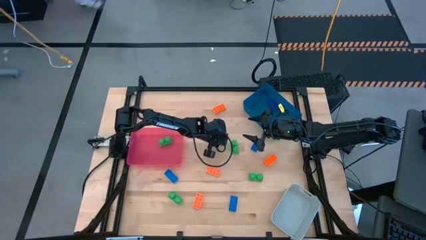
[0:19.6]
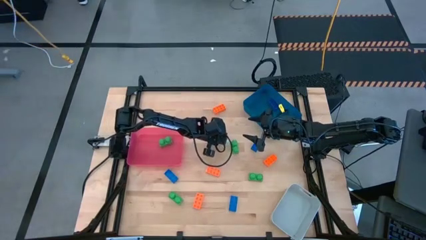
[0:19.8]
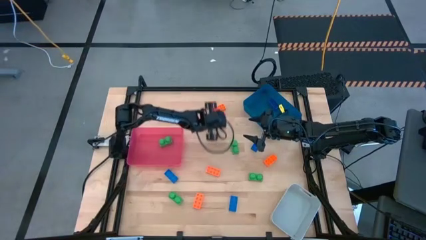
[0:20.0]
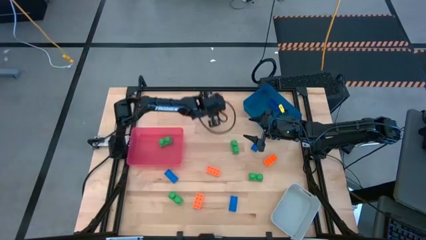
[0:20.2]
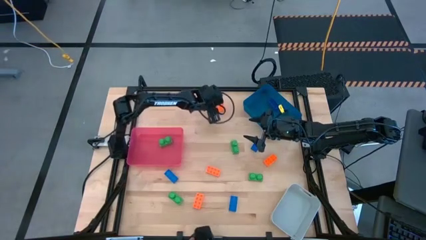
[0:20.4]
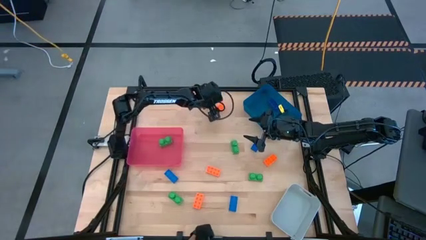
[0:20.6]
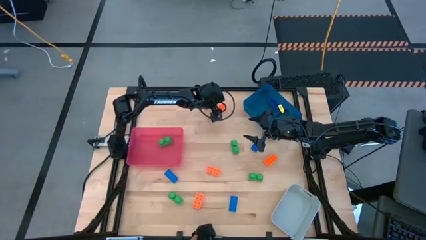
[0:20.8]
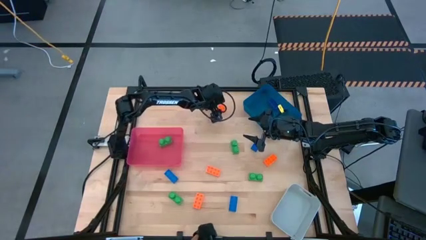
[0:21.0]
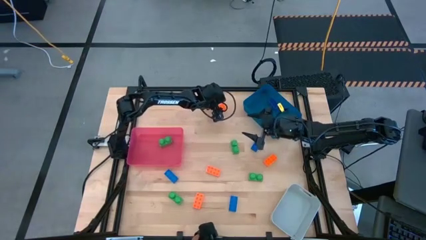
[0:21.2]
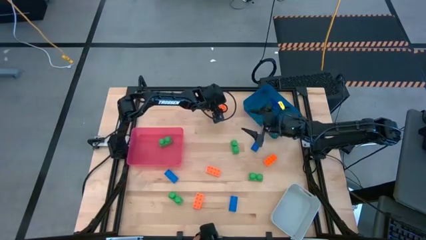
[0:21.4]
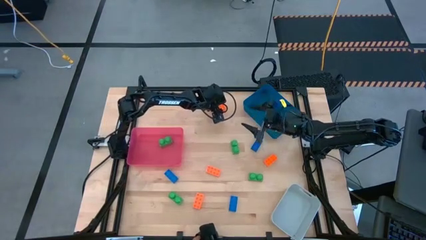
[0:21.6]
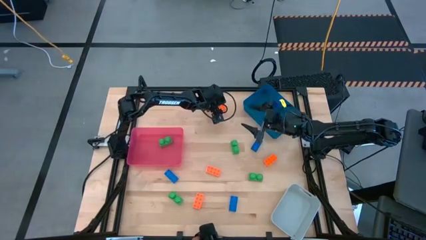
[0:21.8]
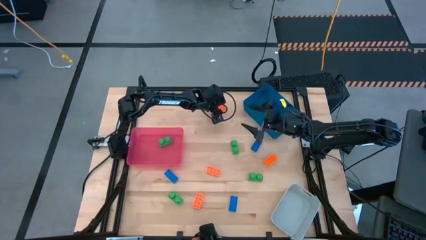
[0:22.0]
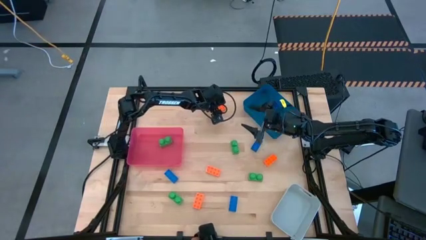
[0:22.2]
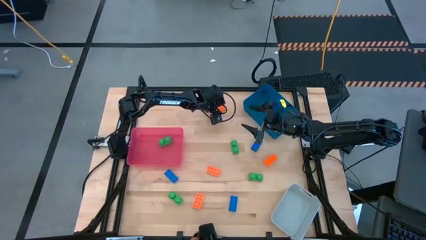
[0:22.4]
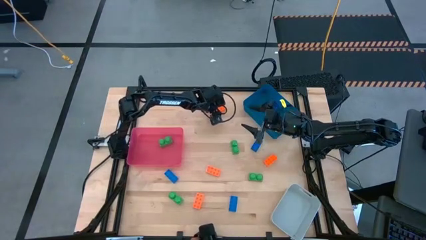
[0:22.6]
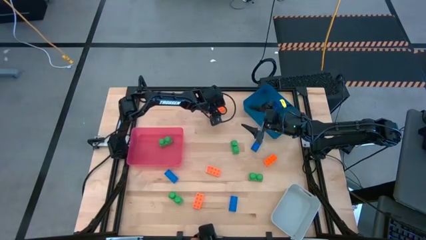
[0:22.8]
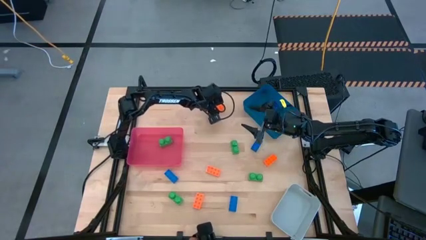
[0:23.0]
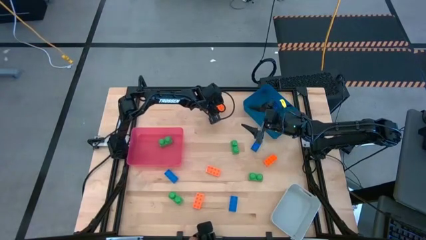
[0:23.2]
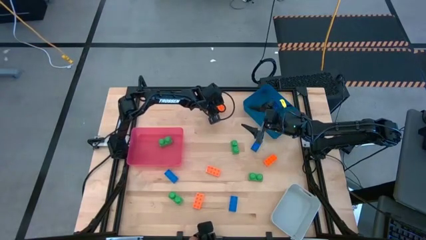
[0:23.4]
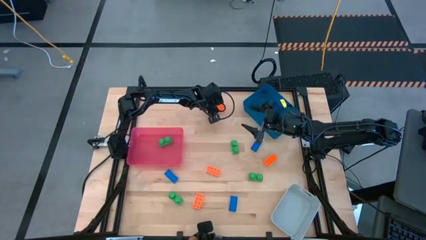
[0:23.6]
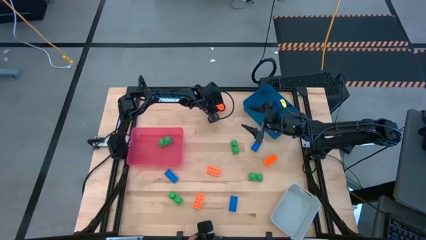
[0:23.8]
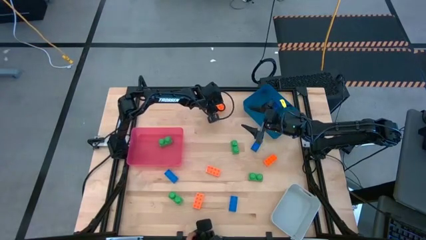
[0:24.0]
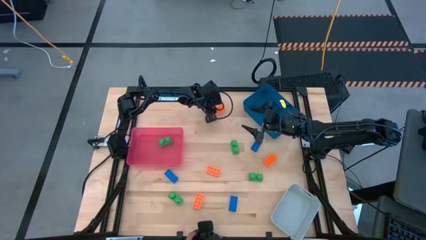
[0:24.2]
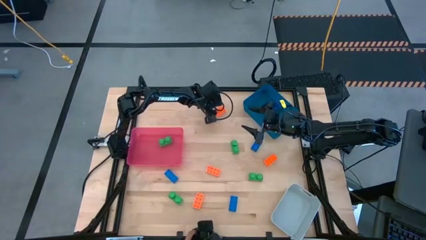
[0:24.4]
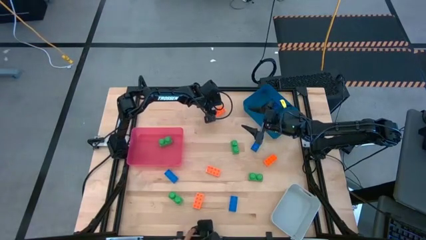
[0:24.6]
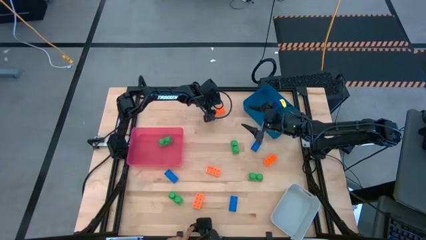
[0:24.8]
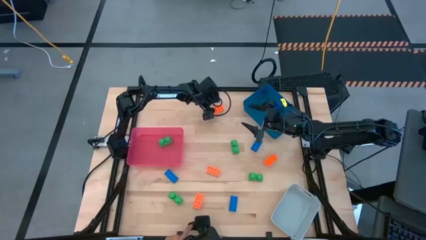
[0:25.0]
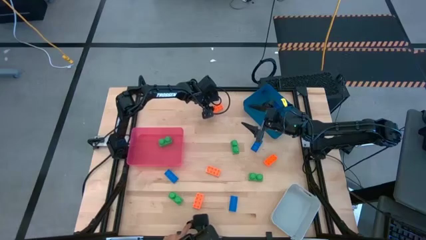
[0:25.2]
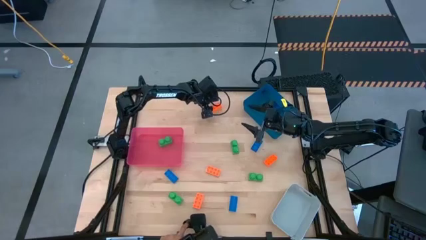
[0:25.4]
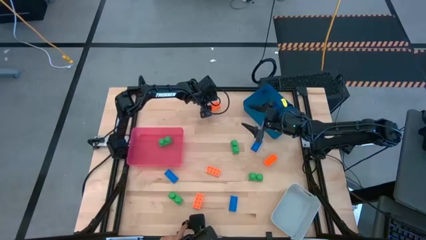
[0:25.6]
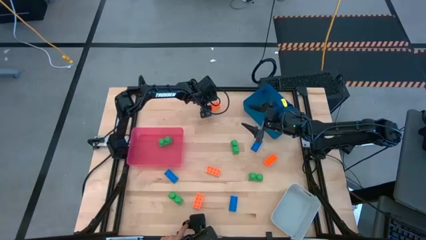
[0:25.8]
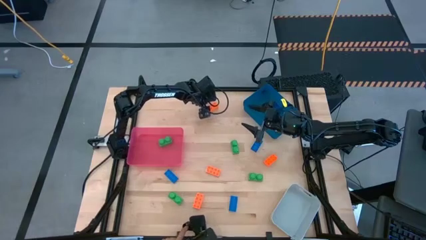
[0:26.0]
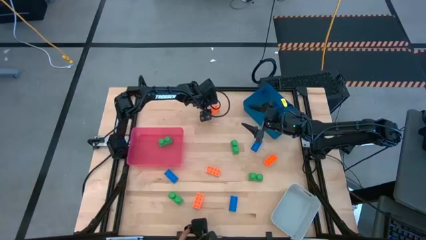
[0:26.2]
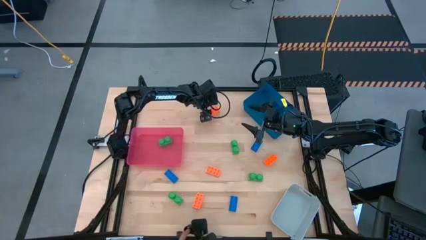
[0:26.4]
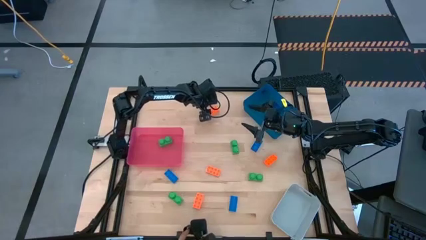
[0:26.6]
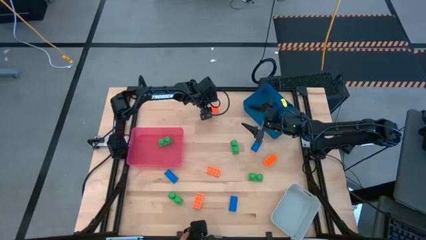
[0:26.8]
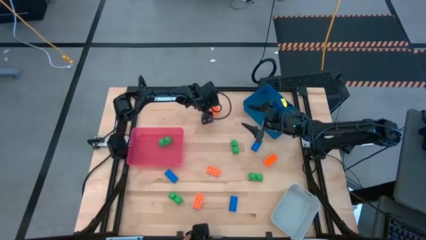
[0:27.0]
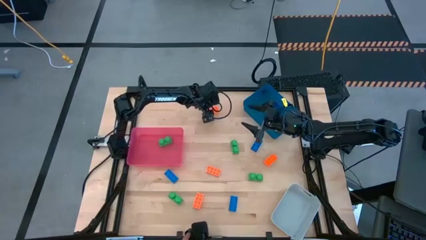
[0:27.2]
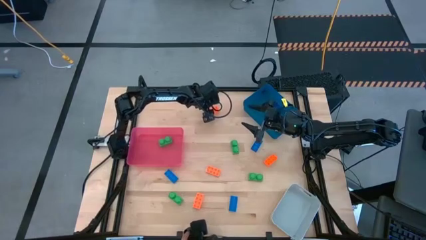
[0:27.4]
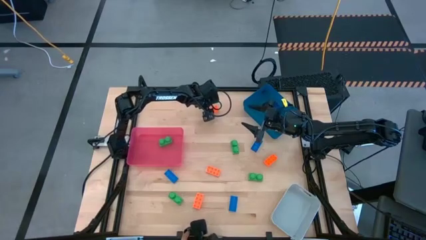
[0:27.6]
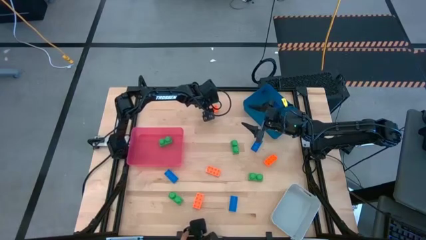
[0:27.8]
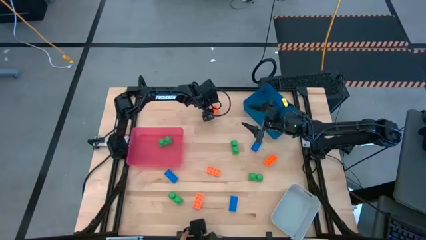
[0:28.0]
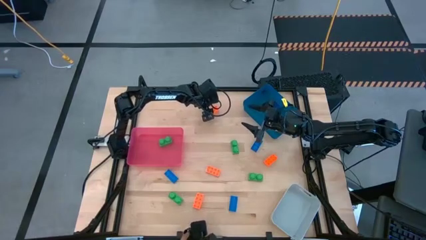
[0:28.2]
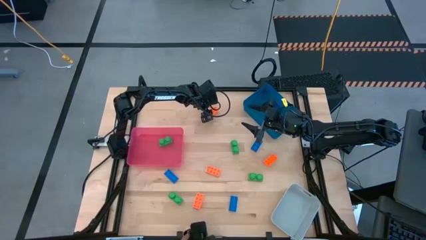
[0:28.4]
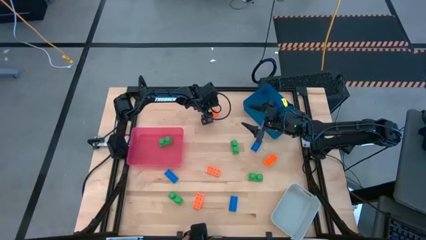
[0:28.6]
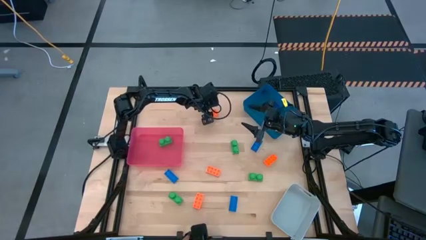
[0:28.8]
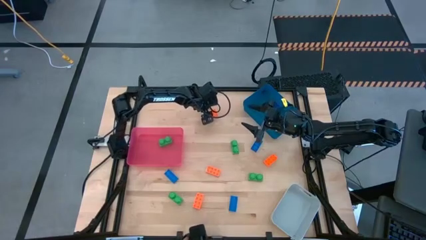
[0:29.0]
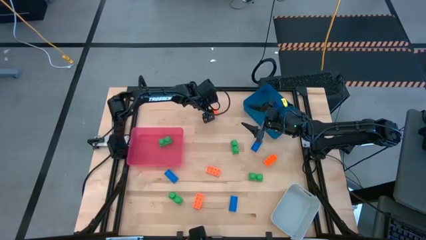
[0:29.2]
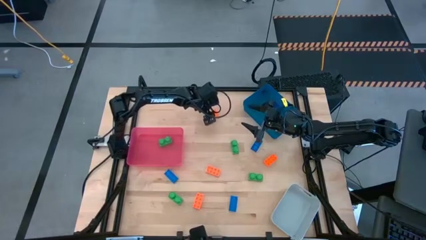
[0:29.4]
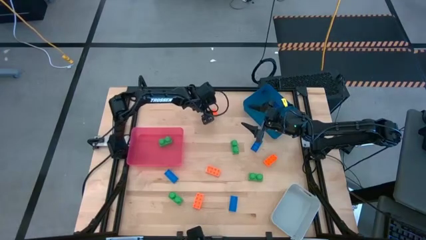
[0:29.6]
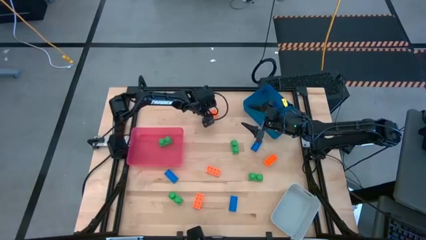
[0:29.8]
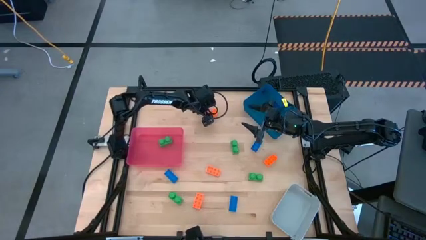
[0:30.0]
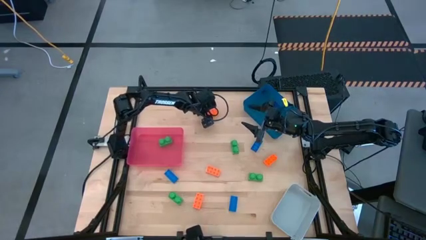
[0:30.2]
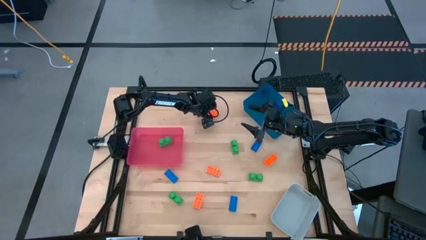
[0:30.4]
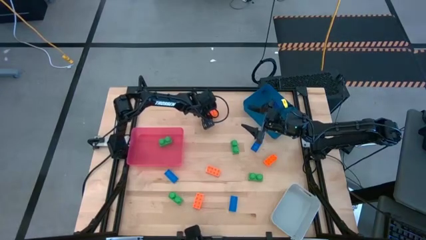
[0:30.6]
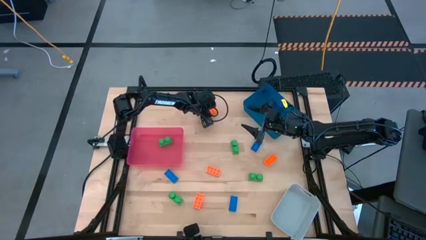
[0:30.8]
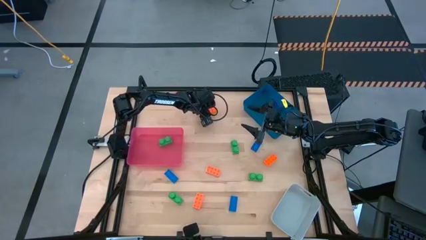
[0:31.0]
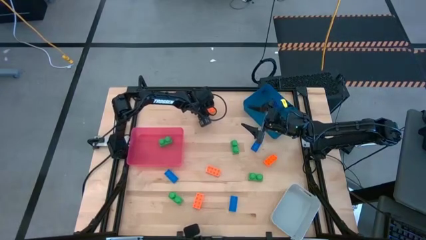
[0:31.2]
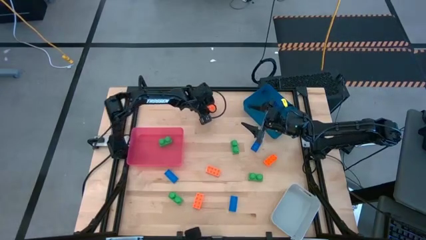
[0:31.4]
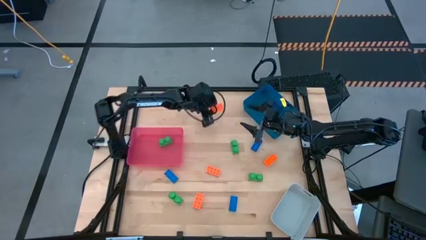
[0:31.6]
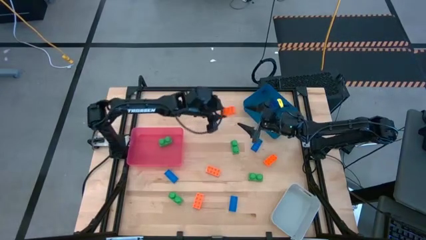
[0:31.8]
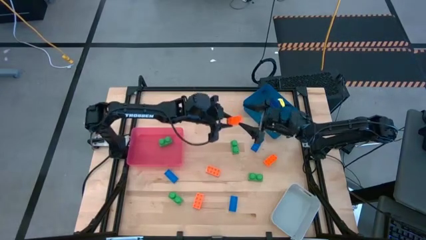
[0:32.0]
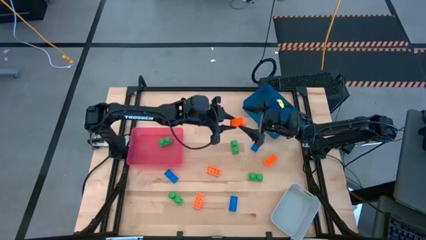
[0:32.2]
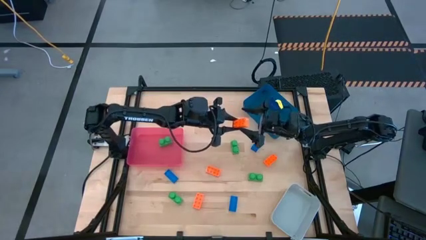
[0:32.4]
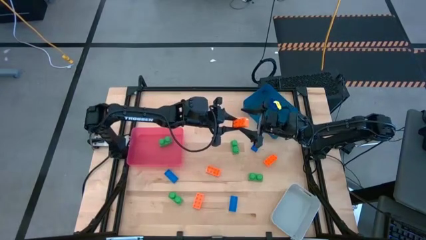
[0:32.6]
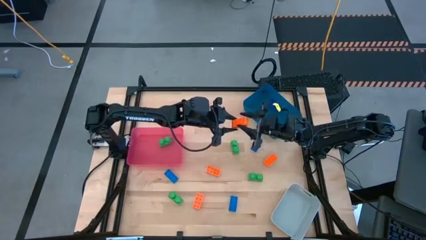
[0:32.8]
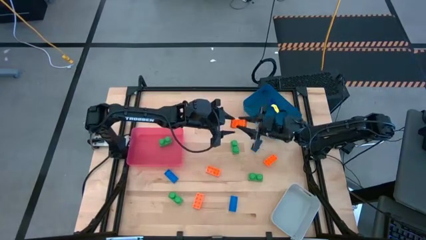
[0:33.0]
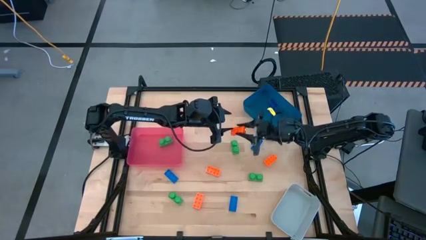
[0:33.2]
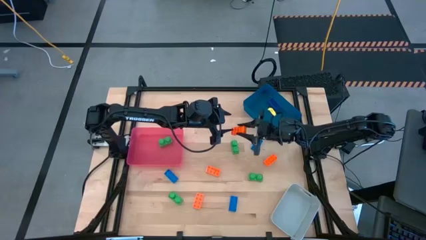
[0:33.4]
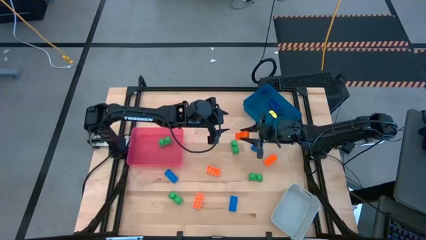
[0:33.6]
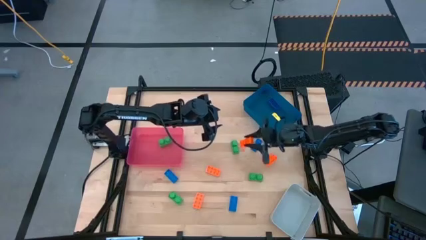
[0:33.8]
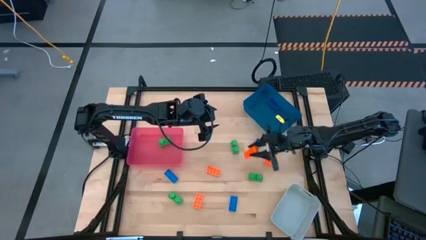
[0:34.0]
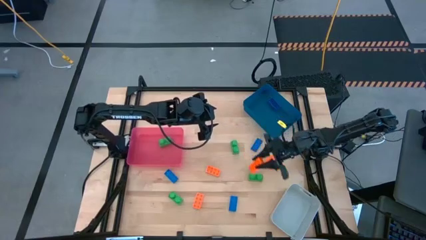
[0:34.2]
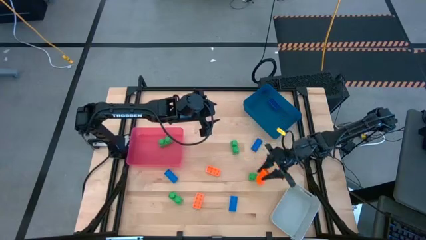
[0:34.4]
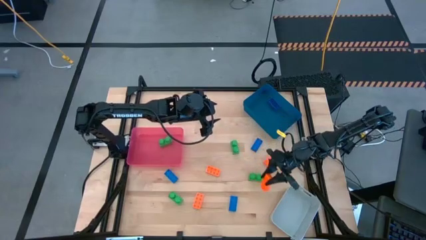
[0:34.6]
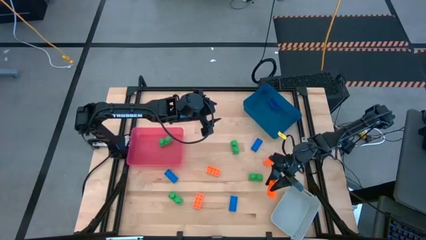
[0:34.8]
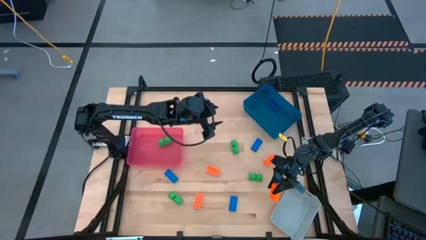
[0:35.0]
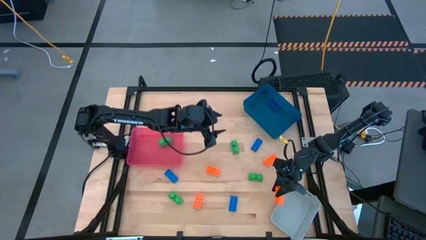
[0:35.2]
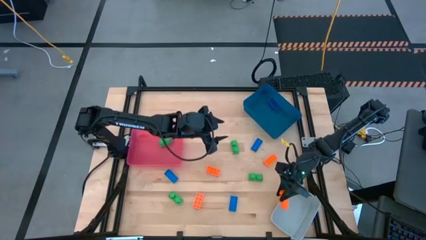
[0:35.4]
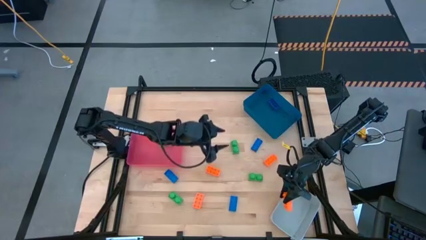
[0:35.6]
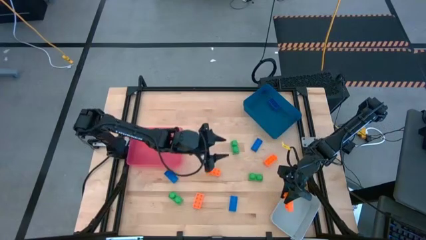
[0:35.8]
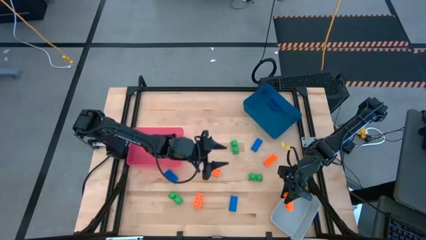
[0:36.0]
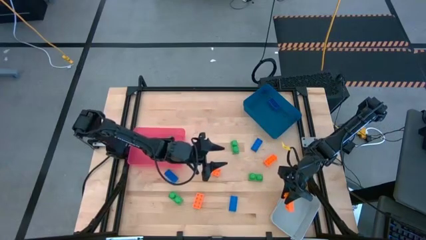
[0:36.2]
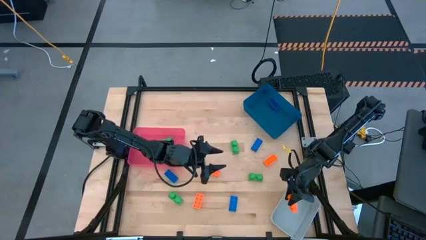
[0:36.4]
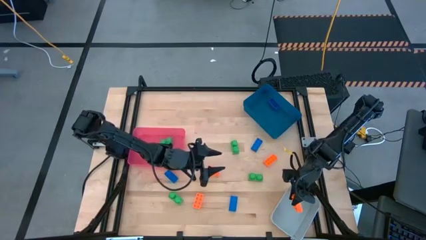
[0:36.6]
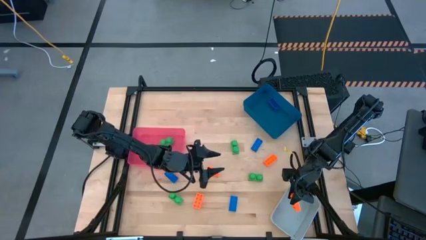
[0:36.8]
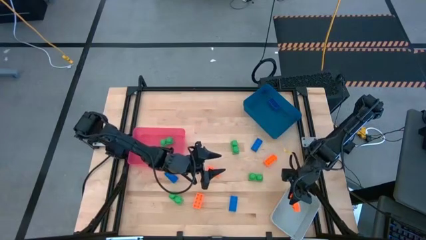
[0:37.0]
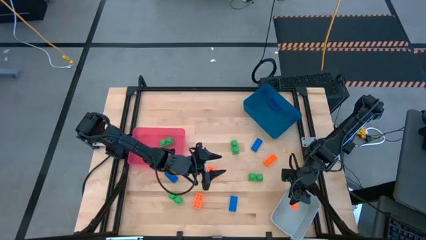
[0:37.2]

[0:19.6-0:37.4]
Task: Sort & place blocks by color
Put the orange game piece into the gray bin
